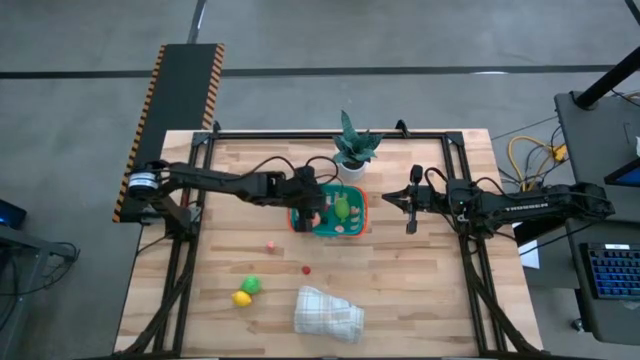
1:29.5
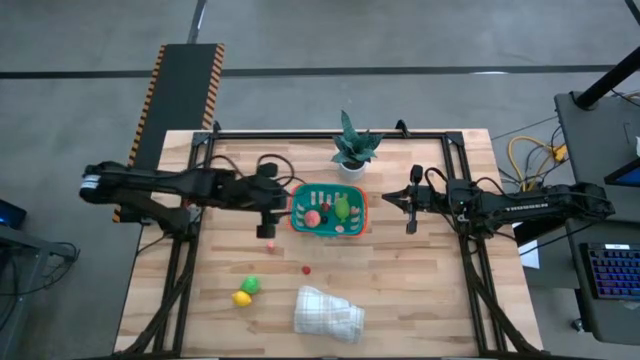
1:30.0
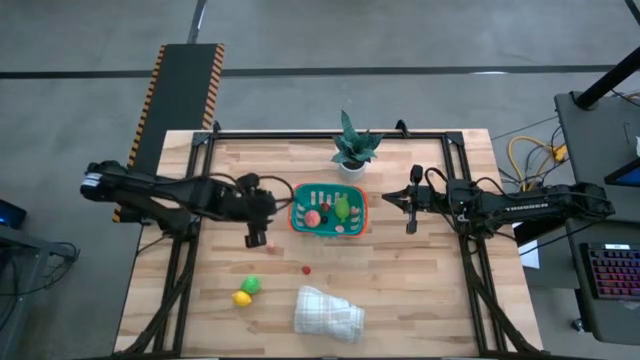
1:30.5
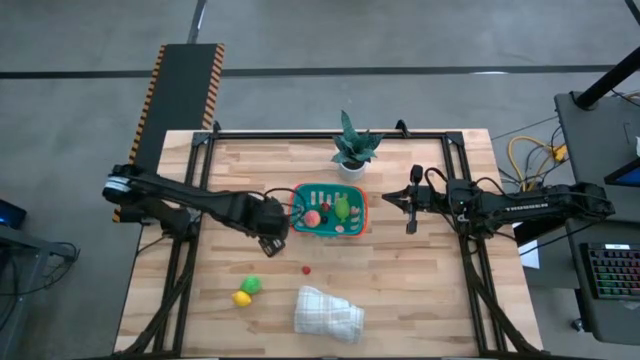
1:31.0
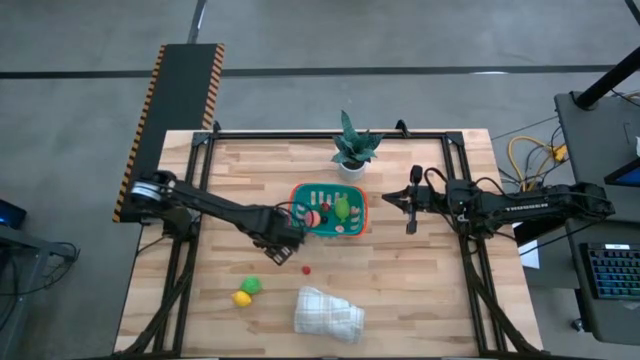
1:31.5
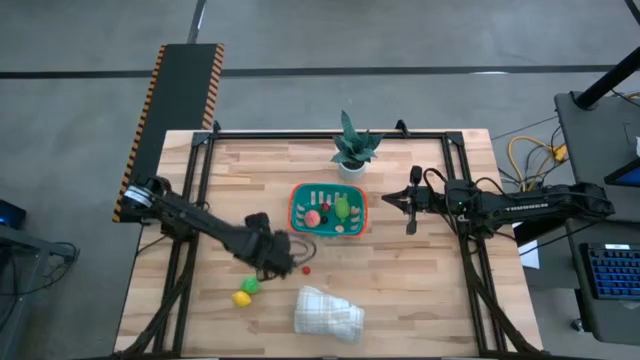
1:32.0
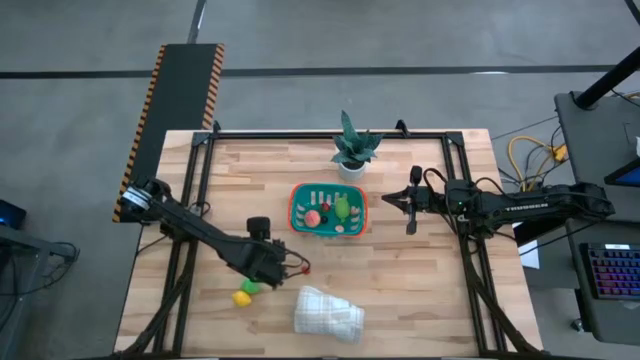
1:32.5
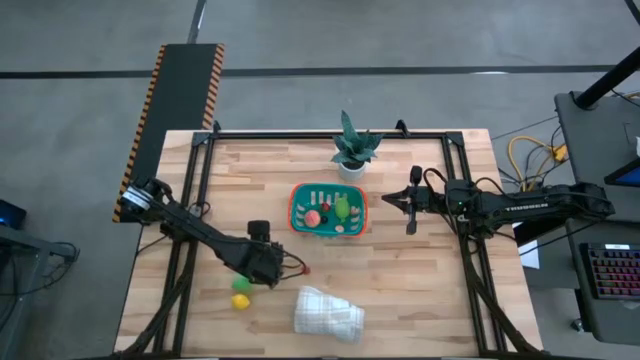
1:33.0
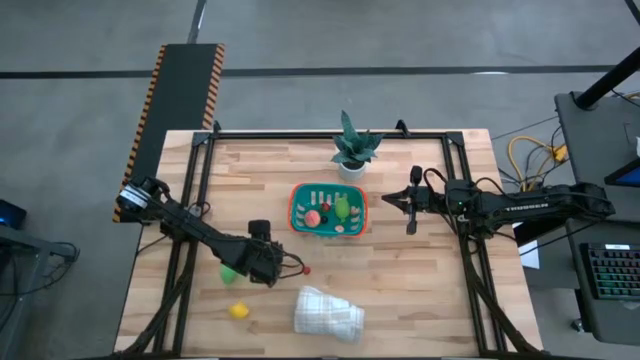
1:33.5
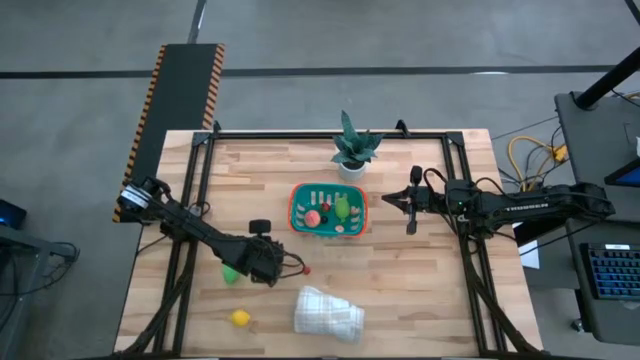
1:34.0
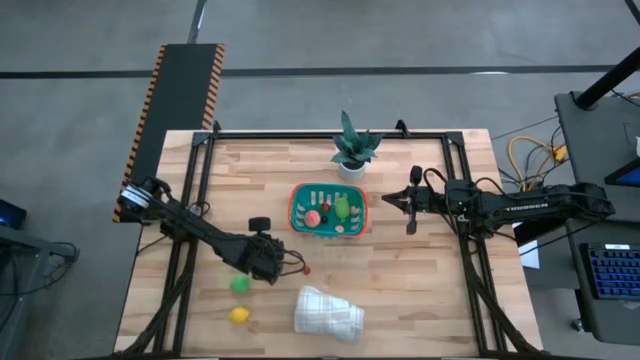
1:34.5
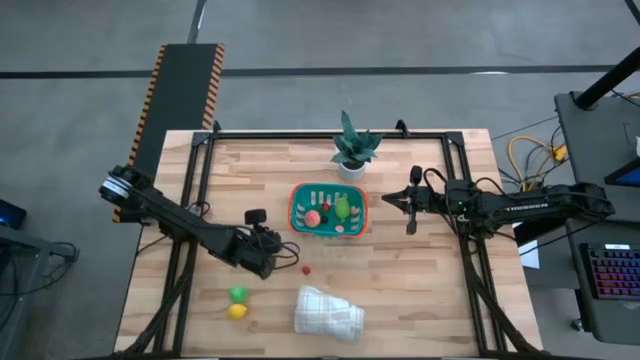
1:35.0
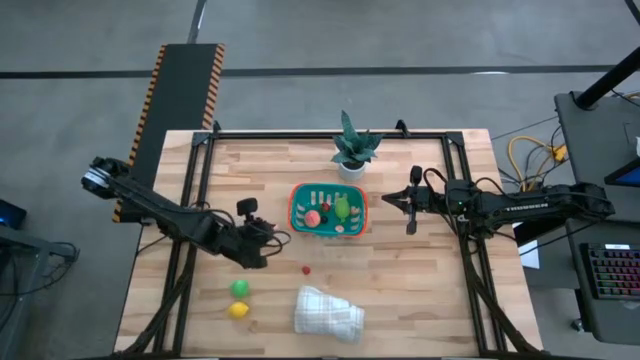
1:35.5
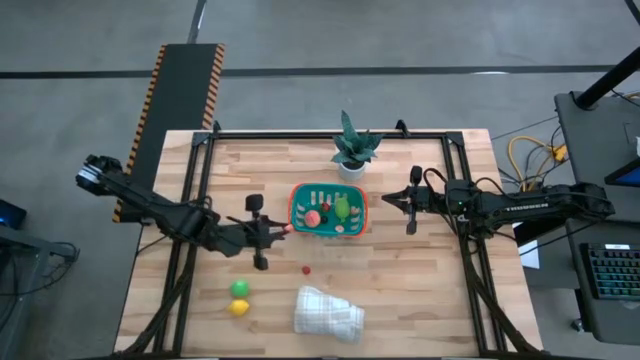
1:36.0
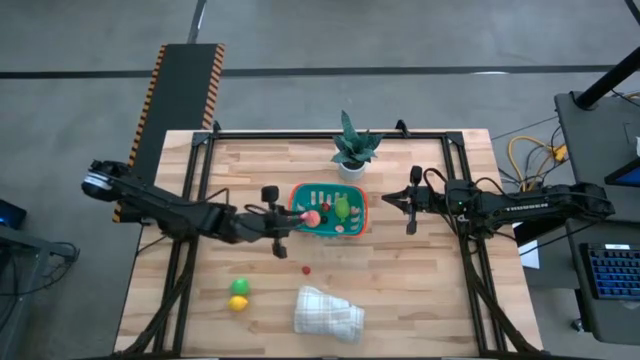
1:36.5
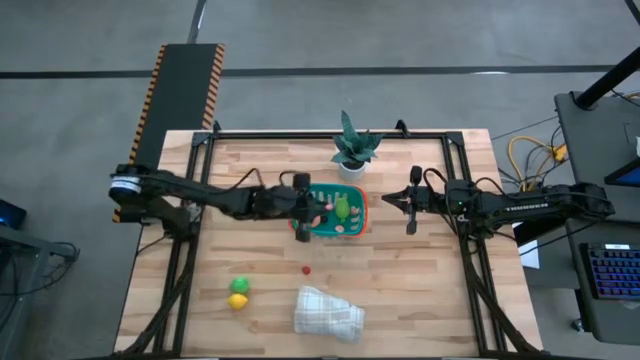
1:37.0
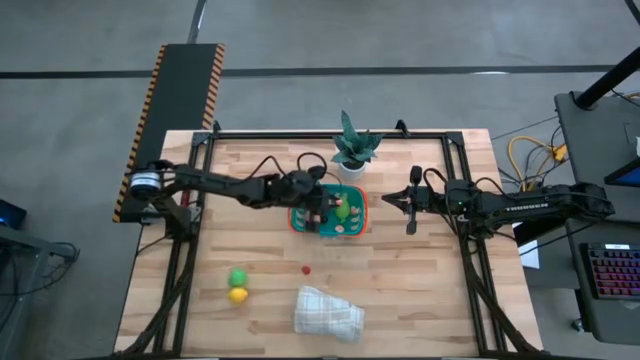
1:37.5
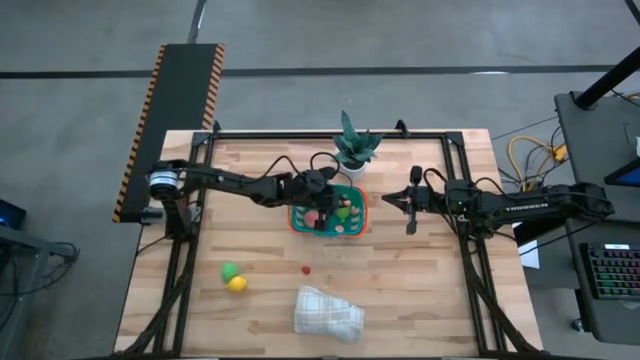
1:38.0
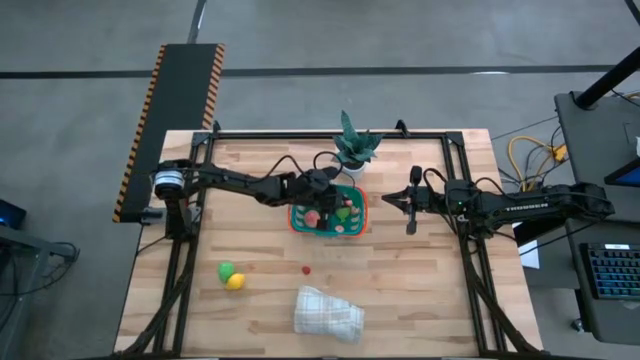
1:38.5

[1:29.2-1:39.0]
Task: Build produce basket
Put the pink peach into the blue basket

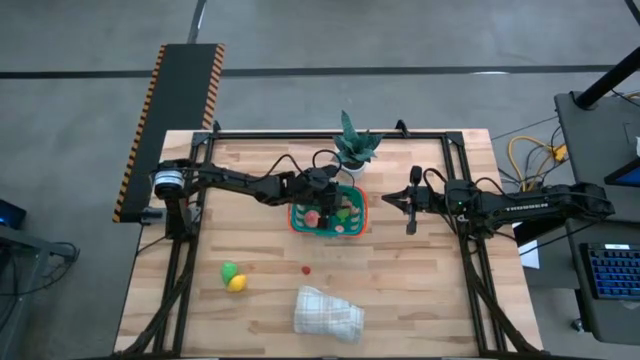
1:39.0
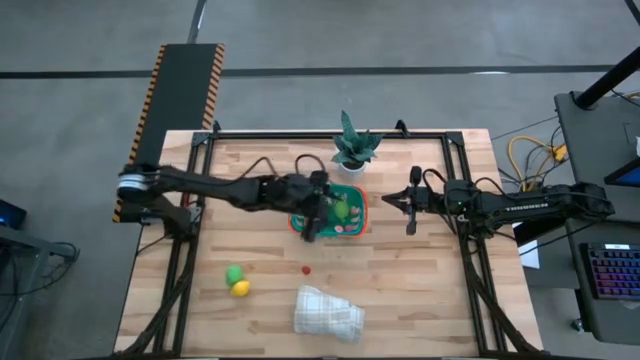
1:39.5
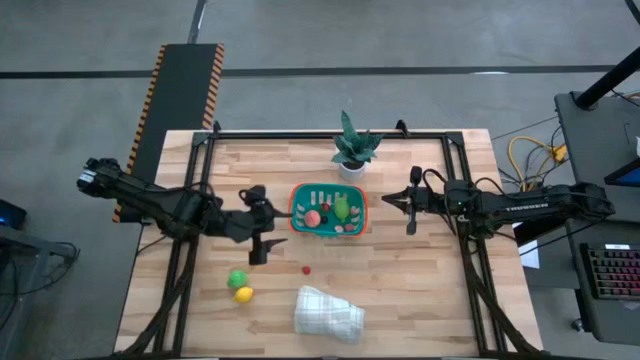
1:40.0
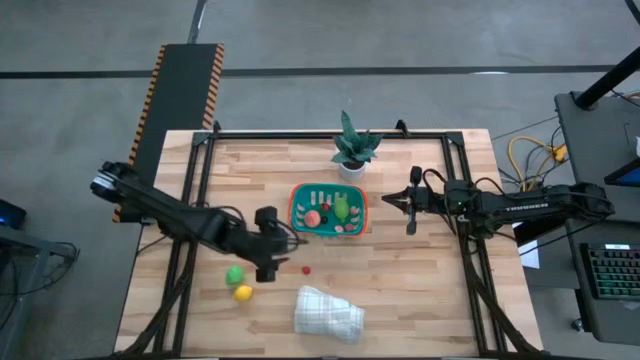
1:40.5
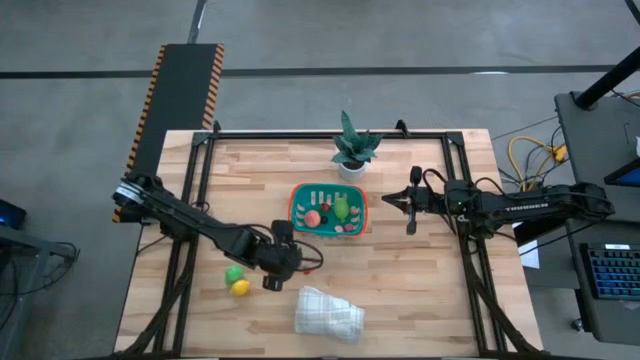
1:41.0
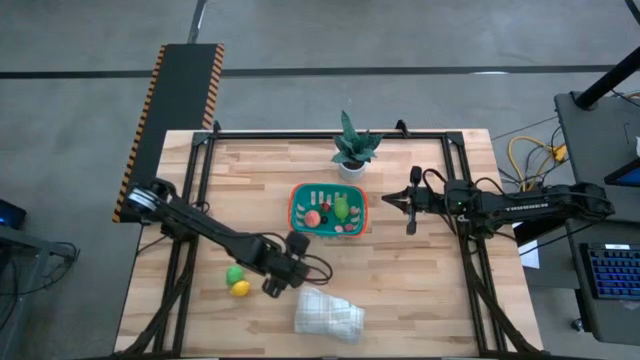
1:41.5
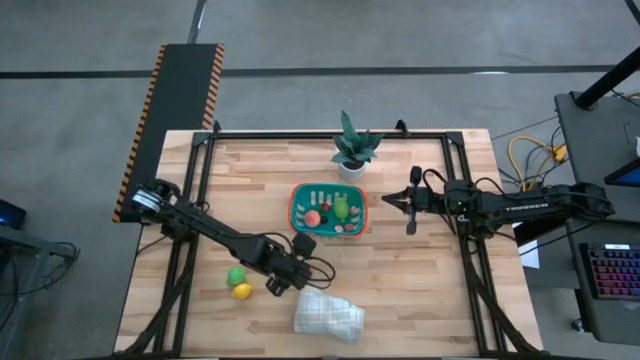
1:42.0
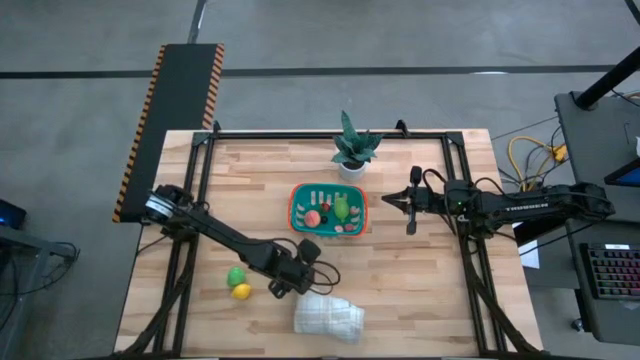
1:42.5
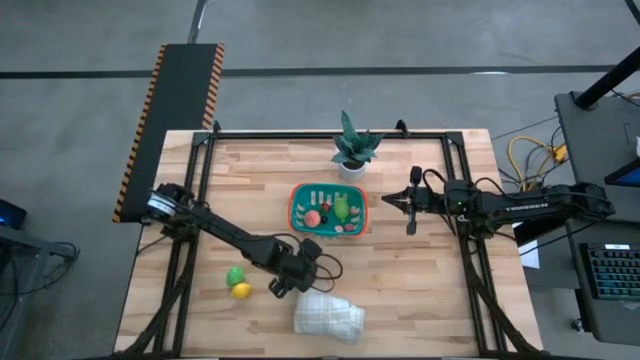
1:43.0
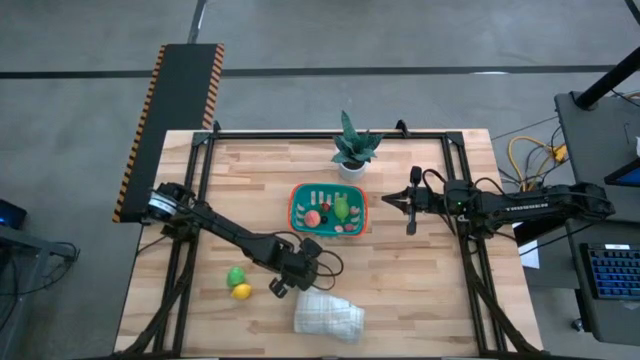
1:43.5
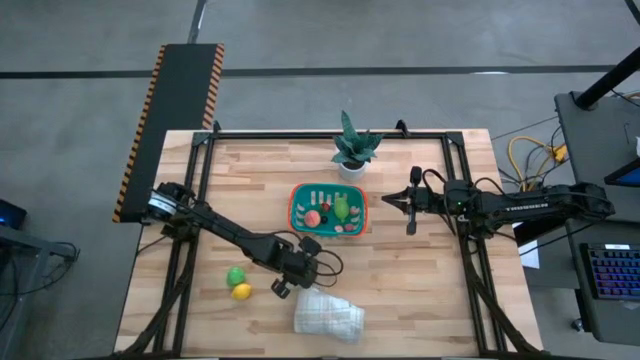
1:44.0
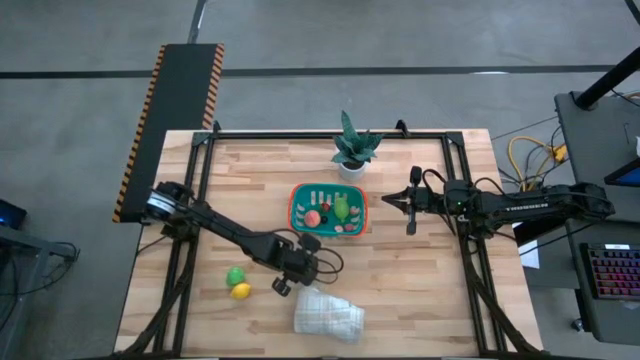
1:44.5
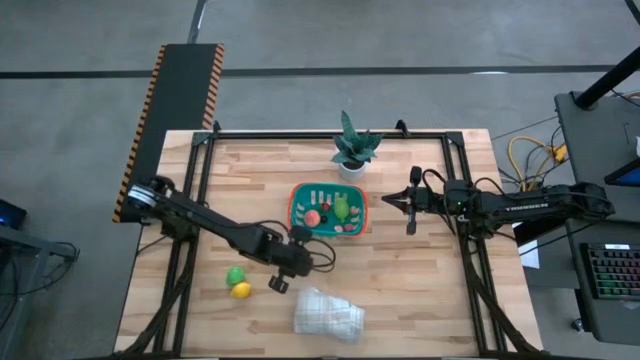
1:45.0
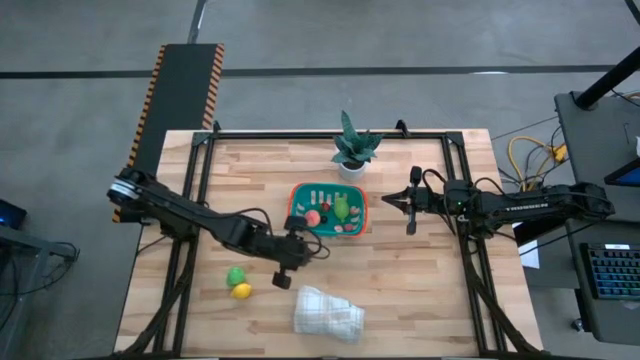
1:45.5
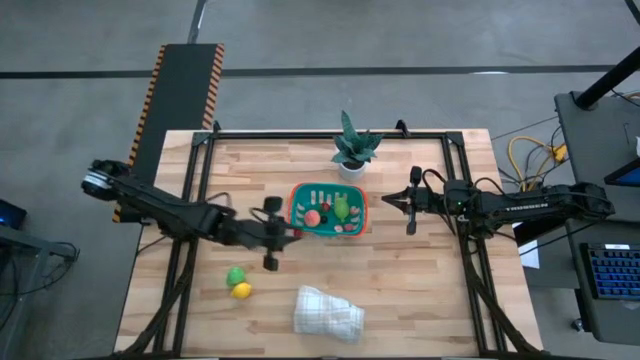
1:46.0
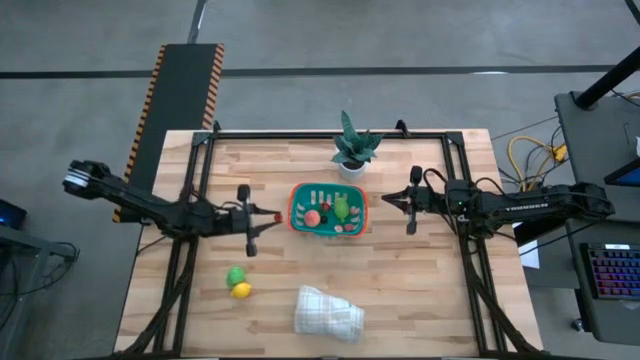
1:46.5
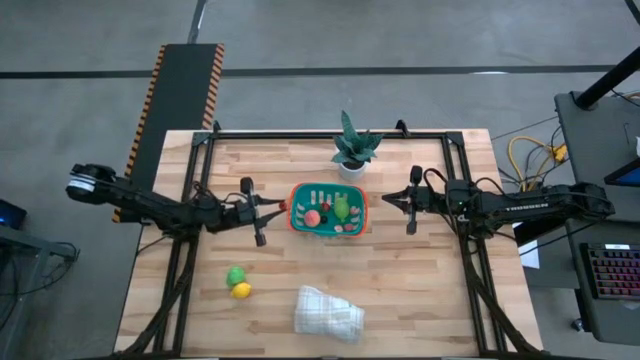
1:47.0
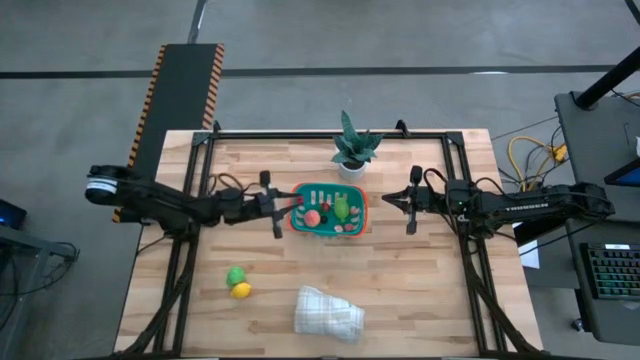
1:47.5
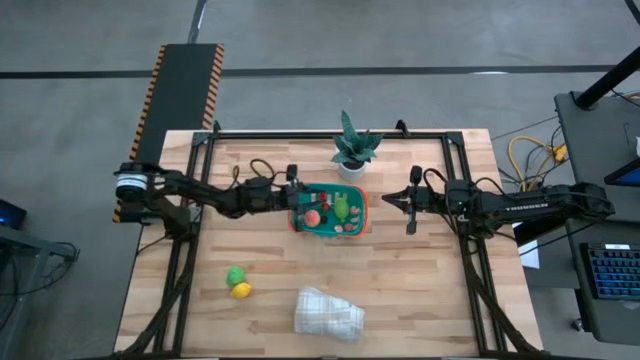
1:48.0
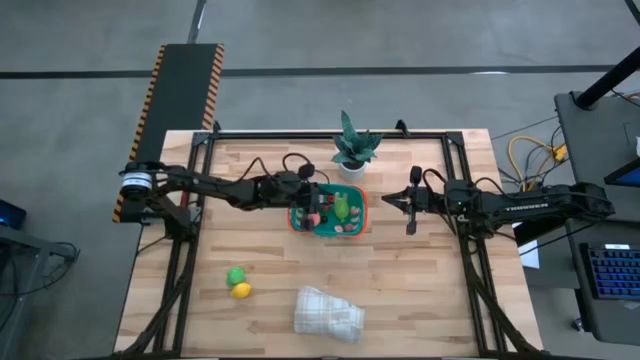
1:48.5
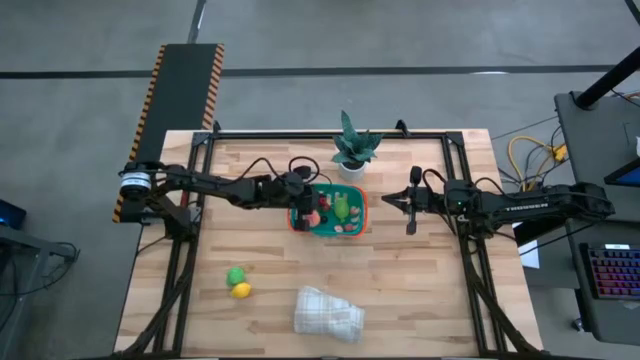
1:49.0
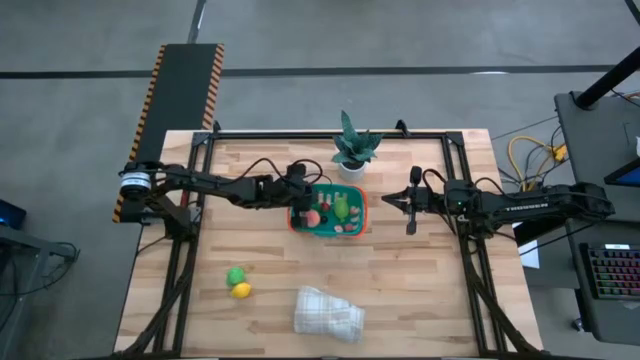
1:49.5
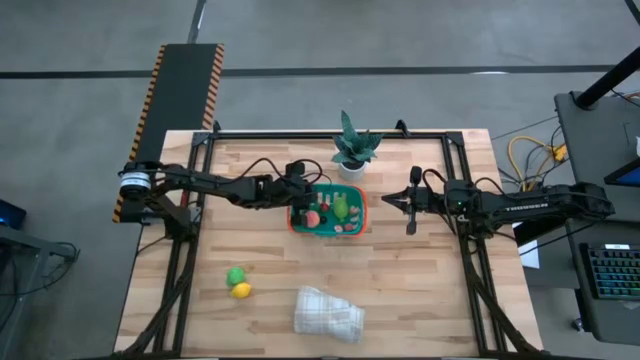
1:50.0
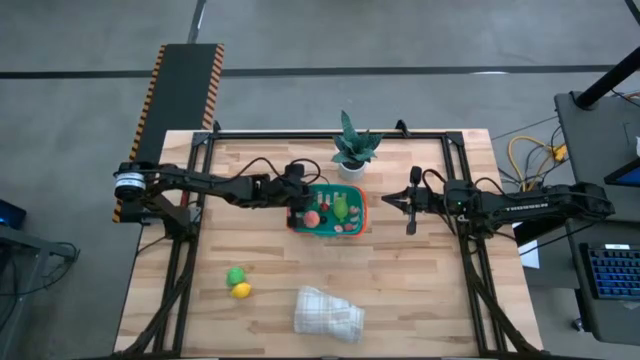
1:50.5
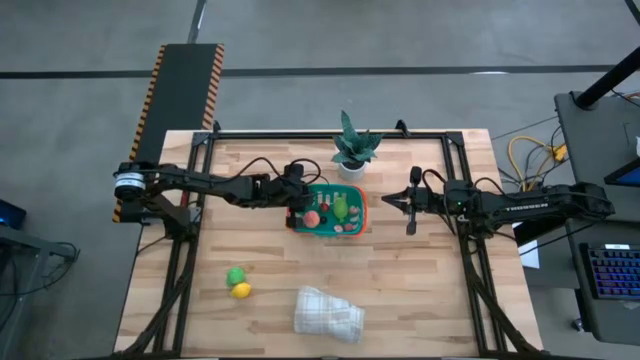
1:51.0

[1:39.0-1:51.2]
Put the red raspberry into the blue basket
